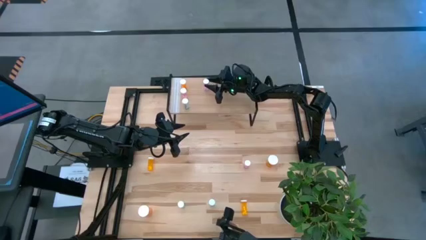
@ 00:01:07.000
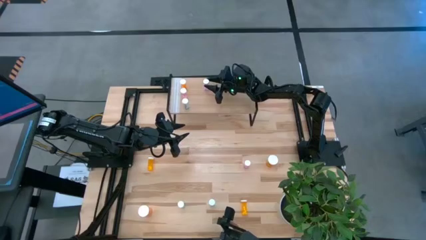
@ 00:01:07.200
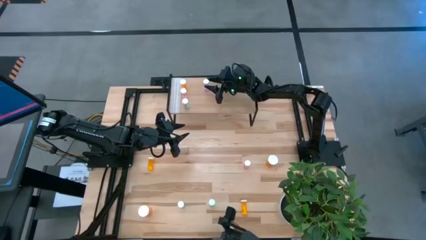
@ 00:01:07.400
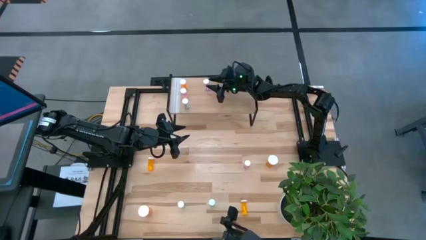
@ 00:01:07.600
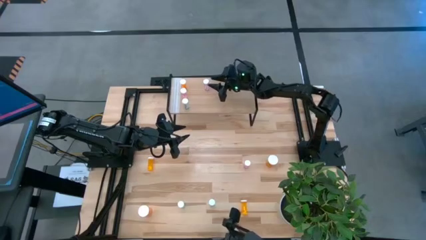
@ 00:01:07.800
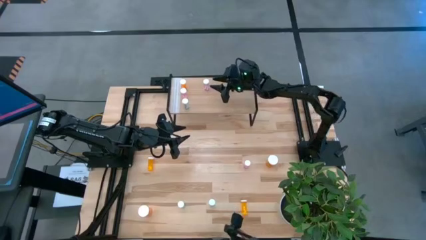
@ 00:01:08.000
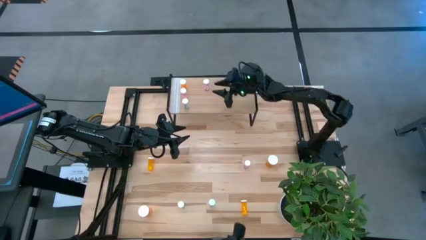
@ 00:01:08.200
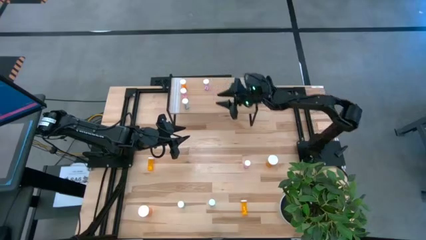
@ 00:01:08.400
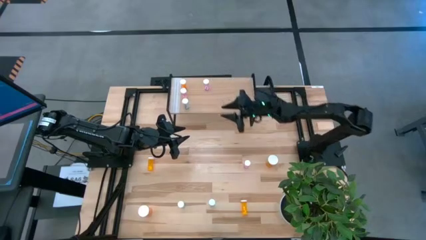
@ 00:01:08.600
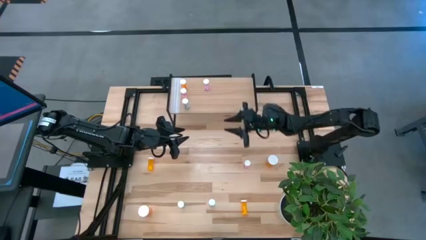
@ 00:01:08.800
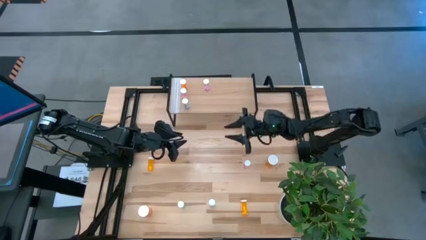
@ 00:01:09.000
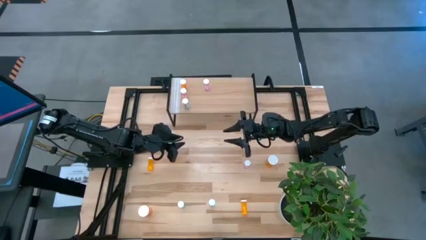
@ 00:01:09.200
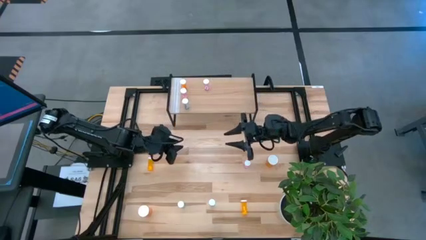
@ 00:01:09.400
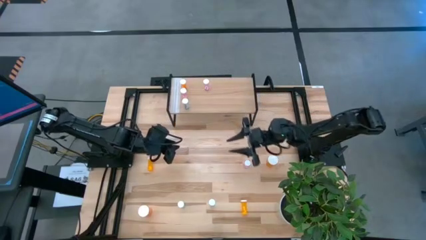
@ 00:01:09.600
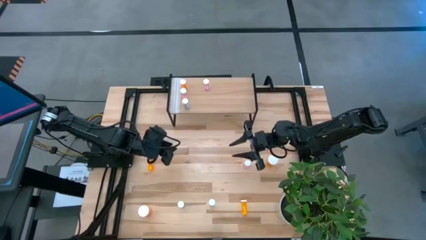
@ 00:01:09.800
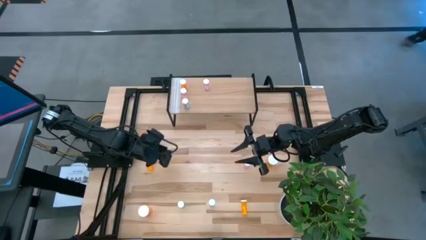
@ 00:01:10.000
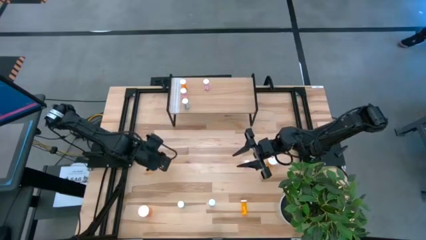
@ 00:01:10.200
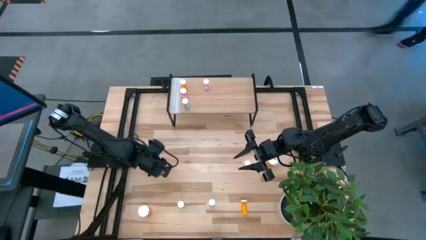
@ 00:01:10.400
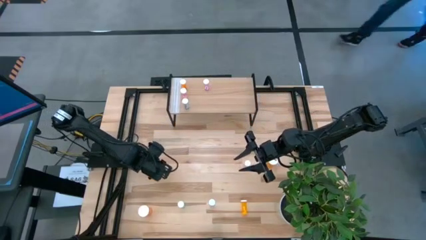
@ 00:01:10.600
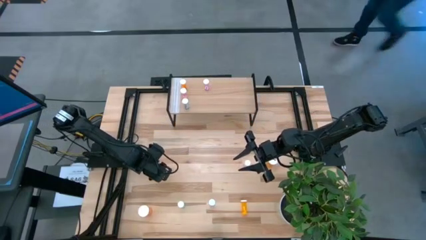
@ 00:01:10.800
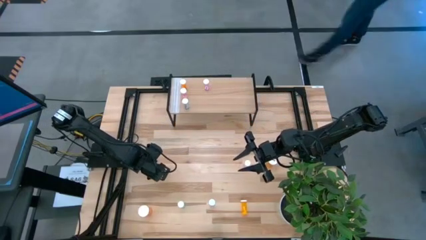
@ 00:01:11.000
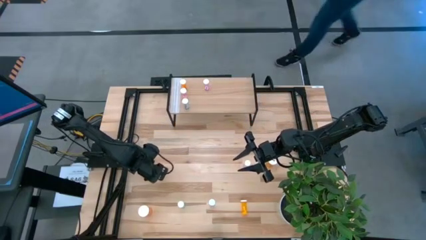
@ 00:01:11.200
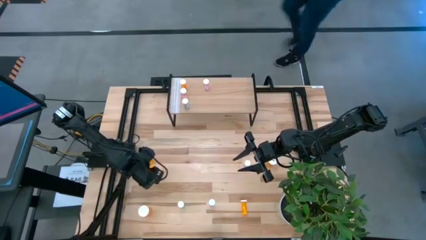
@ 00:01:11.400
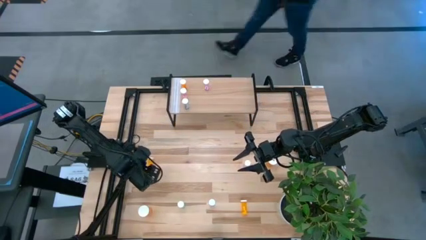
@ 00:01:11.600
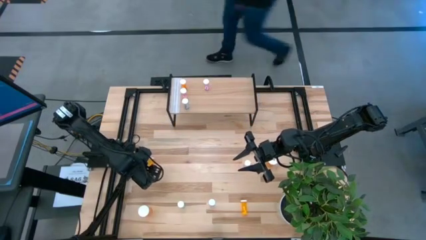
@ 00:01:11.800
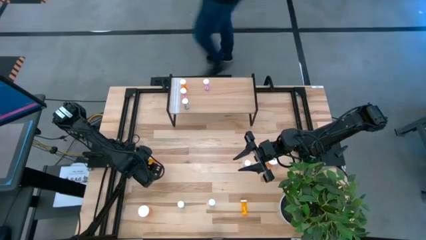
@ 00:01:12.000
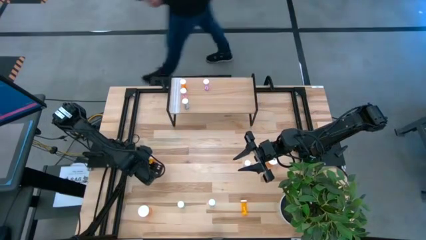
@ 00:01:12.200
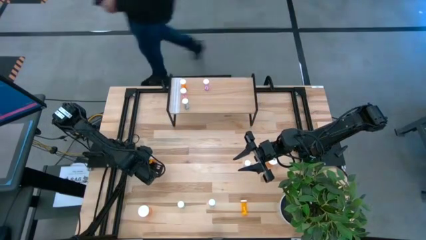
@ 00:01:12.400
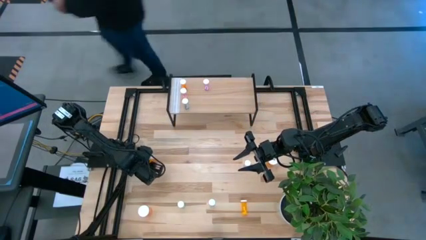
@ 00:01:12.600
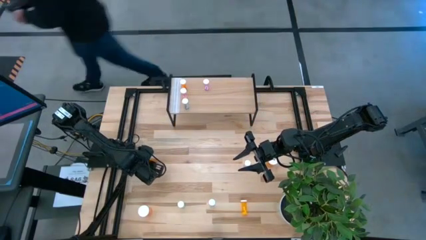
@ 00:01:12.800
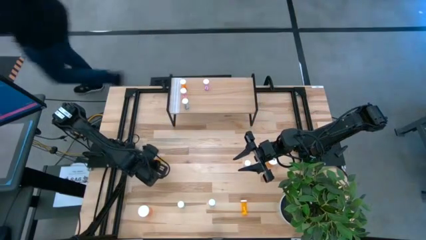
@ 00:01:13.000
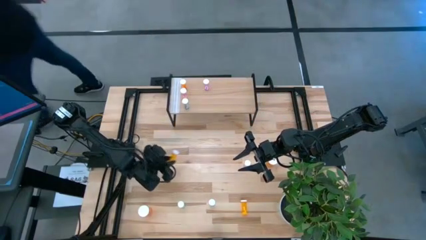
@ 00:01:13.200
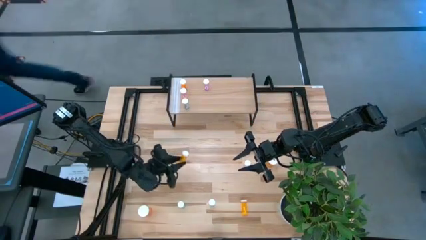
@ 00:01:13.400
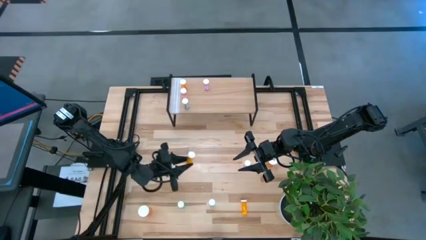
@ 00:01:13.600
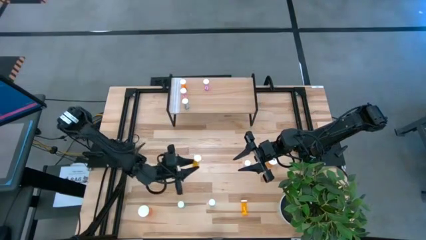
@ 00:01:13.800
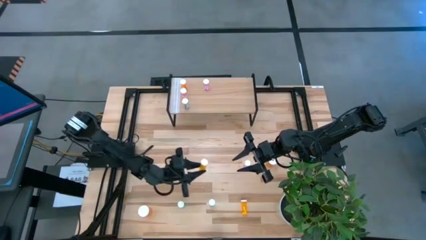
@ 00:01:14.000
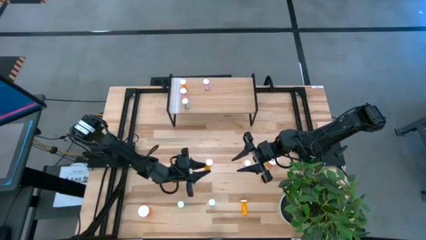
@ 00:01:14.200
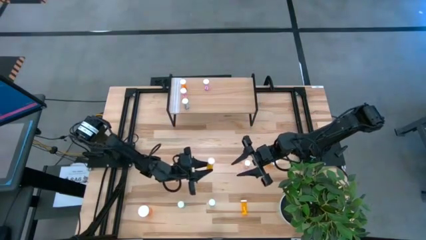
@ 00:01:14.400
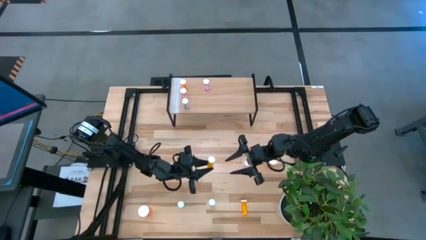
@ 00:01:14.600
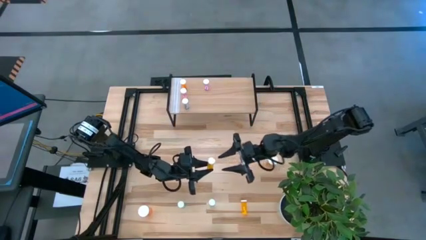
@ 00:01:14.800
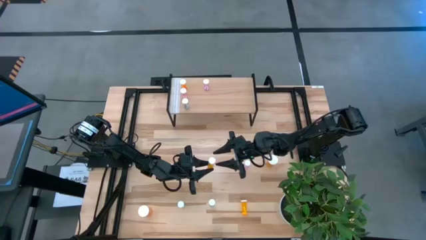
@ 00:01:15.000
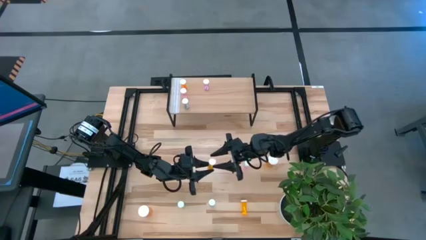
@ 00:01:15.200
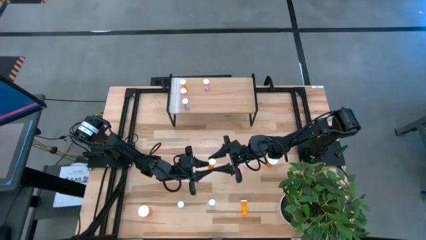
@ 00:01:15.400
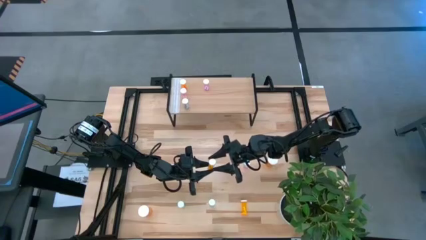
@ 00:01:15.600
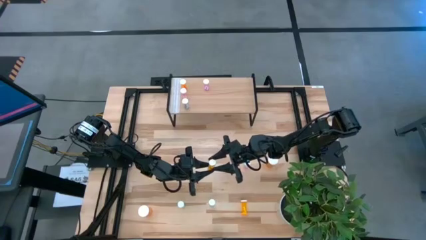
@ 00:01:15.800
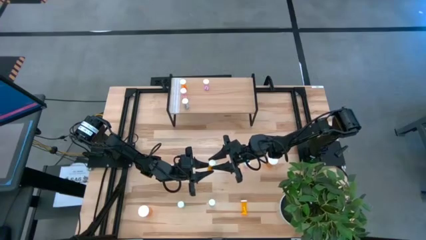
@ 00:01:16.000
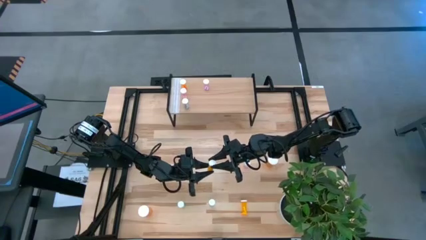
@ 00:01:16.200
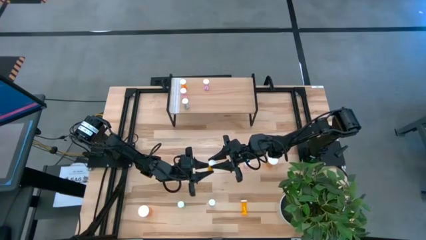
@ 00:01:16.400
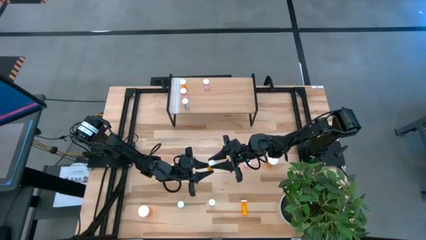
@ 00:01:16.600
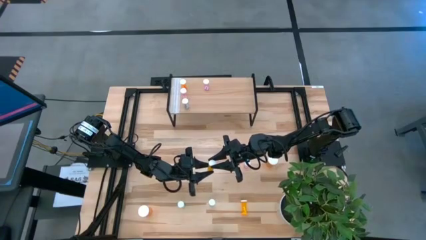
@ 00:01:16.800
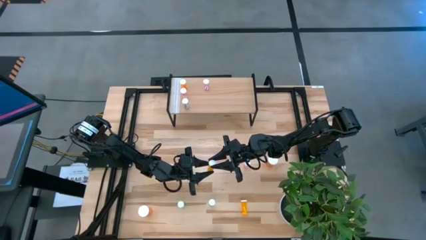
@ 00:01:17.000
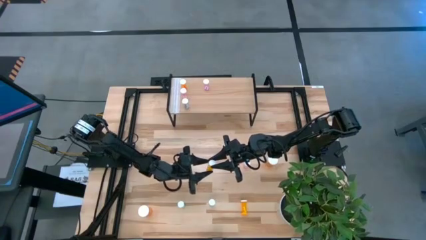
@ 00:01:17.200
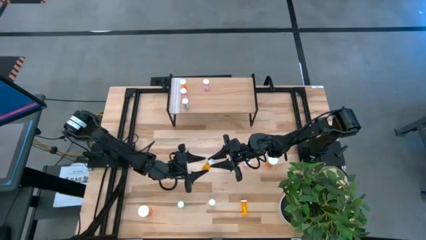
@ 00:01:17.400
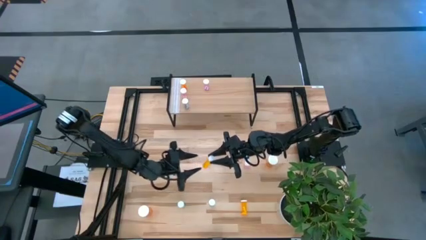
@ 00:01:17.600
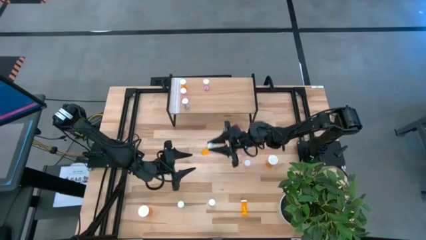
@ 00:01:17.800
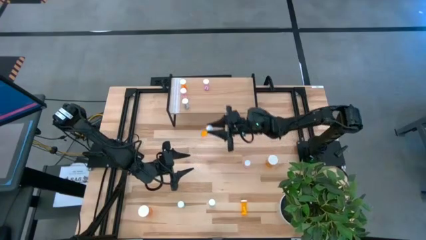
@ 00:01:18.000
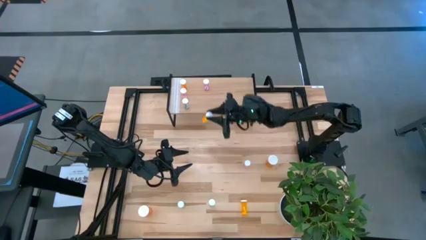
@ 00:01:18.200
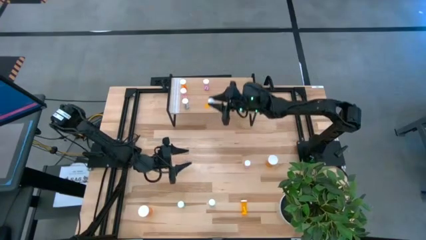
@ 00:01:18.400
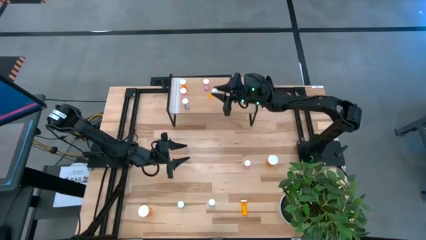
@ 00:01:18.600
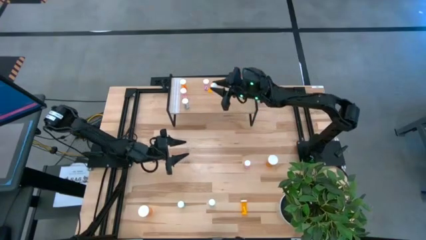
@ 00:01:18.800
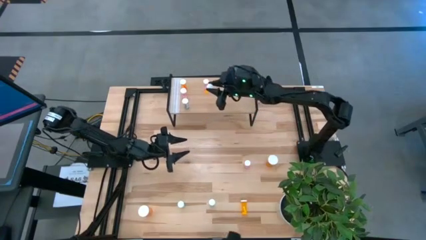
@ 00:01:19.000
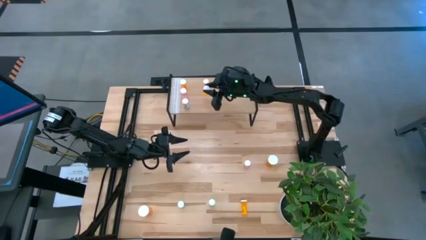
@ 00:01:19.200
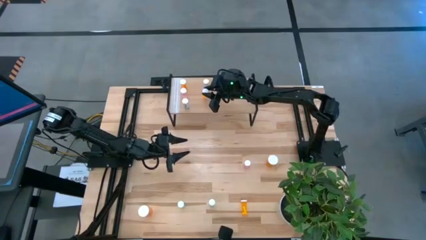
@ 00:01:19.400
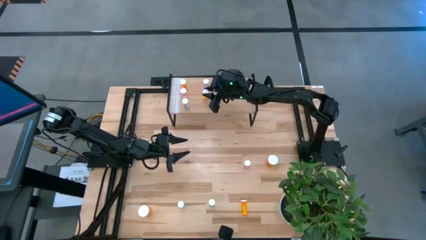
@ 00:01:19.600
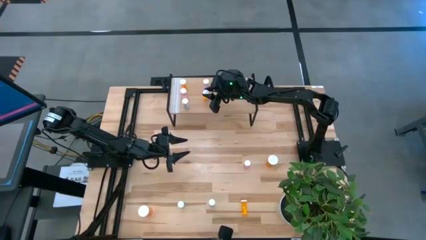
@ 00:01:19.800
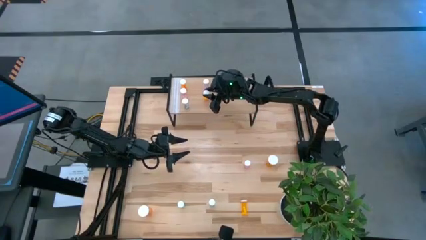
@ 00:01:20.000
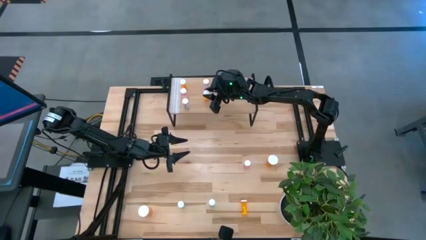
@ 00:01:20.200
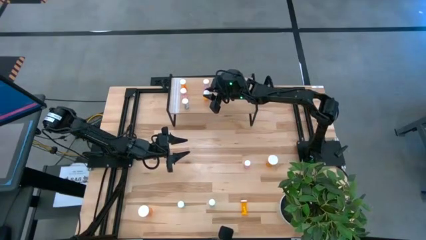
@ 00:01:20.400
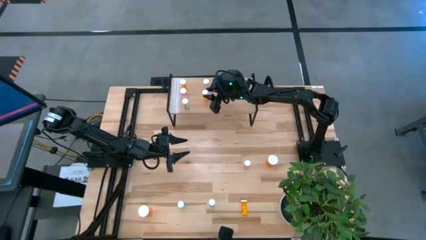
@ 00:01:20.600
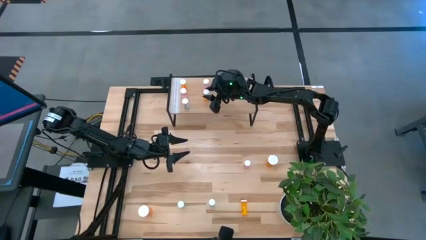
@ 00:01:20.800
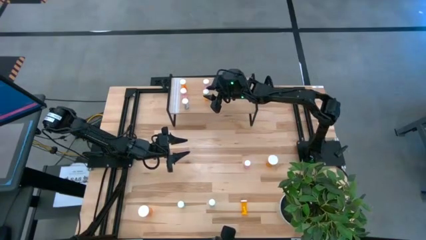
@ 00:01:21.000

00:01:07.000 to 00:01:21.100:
Task: Pick and place medicine bottles onto shelf by color
Put the top small orange pill bottle on the shelf
